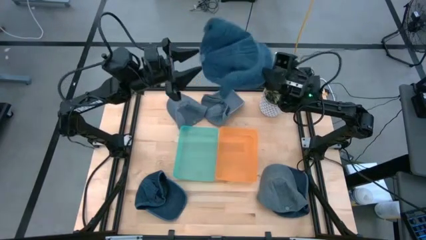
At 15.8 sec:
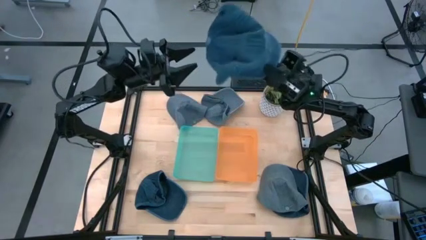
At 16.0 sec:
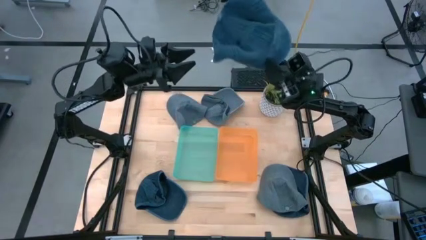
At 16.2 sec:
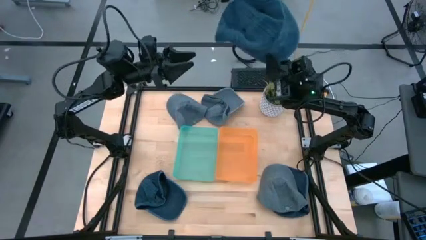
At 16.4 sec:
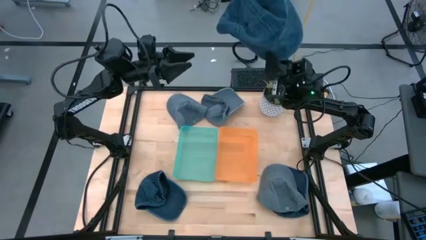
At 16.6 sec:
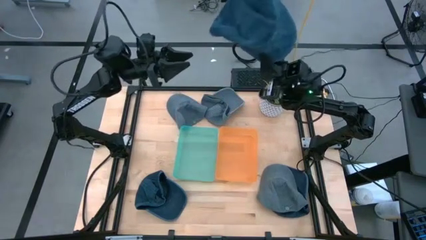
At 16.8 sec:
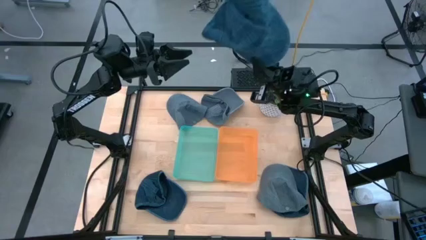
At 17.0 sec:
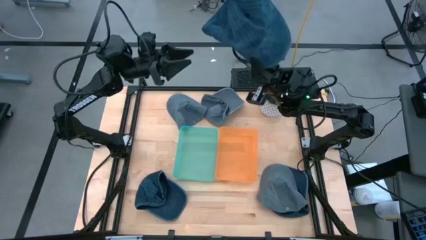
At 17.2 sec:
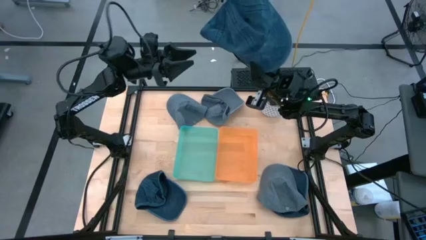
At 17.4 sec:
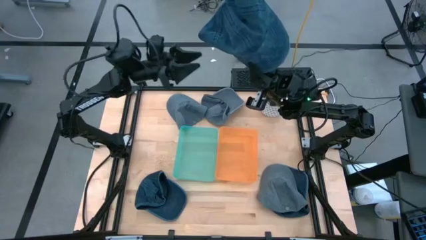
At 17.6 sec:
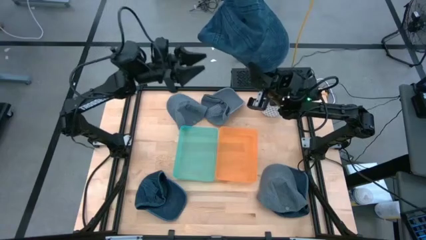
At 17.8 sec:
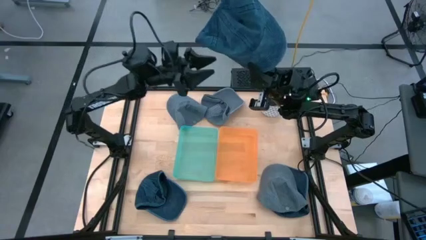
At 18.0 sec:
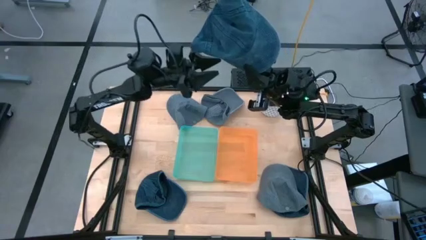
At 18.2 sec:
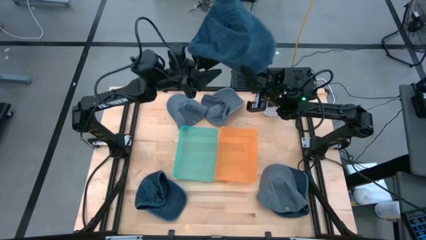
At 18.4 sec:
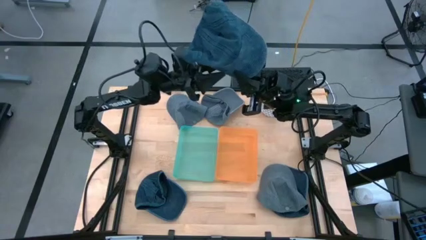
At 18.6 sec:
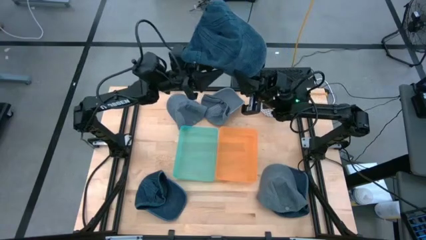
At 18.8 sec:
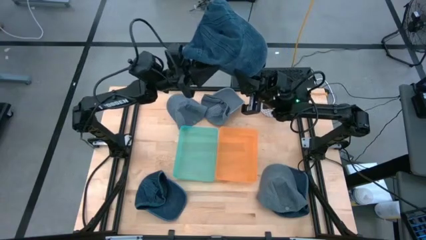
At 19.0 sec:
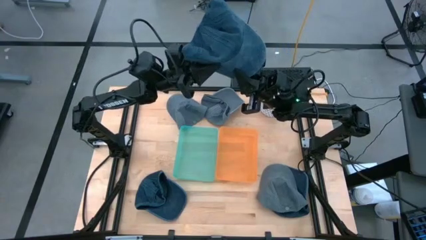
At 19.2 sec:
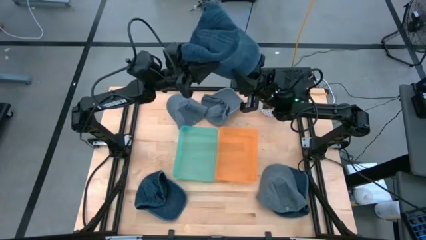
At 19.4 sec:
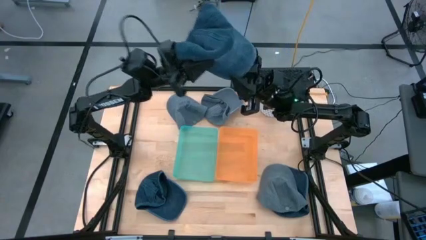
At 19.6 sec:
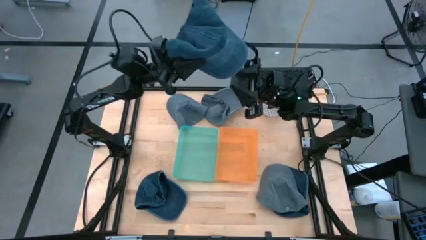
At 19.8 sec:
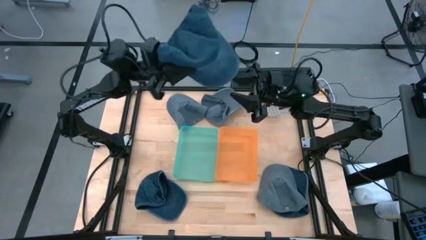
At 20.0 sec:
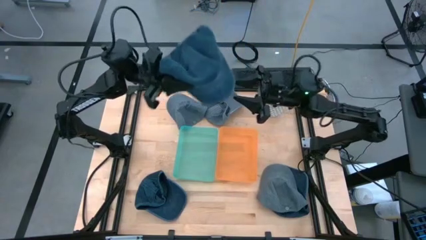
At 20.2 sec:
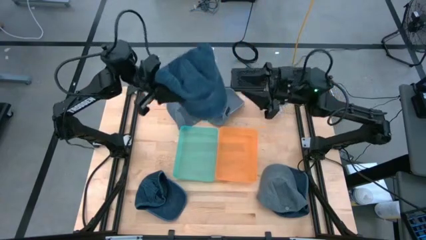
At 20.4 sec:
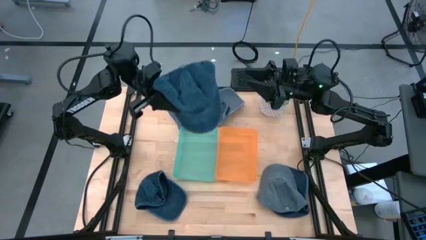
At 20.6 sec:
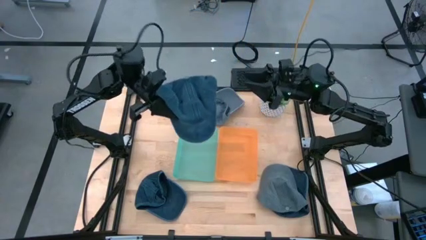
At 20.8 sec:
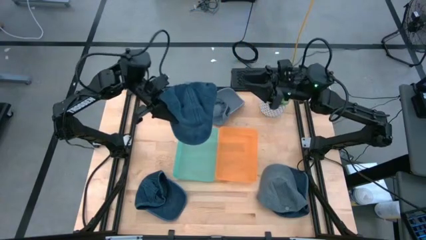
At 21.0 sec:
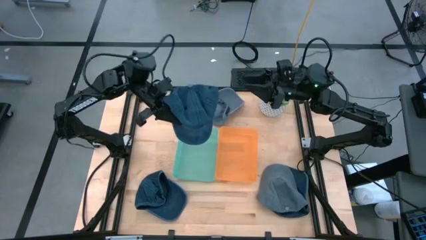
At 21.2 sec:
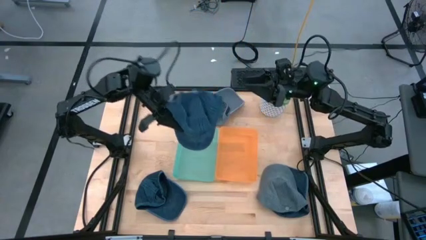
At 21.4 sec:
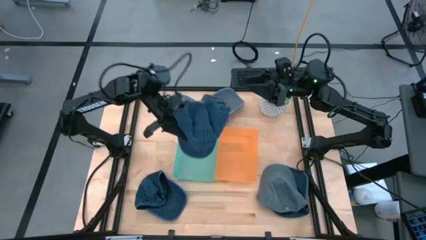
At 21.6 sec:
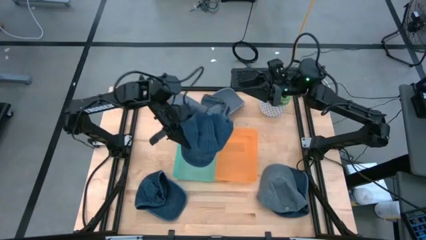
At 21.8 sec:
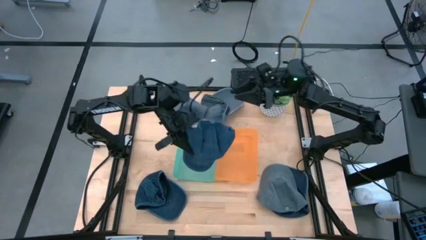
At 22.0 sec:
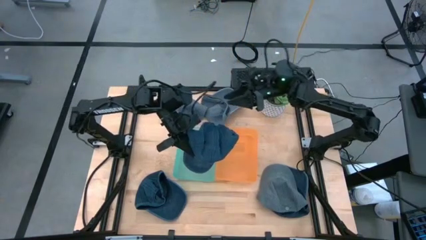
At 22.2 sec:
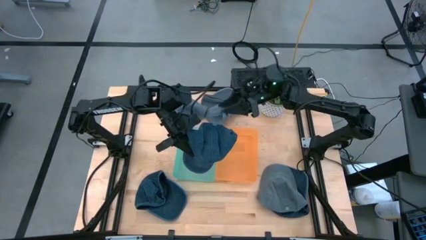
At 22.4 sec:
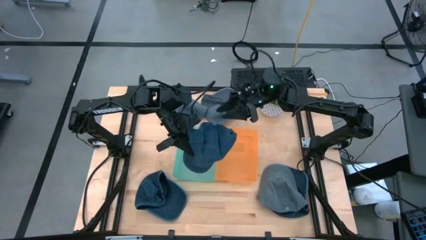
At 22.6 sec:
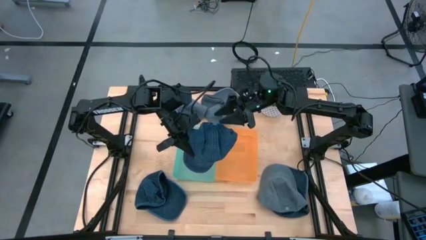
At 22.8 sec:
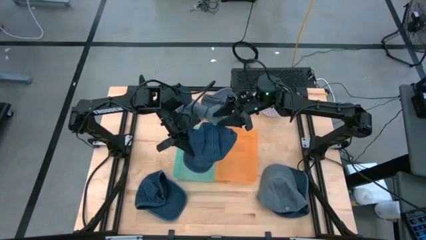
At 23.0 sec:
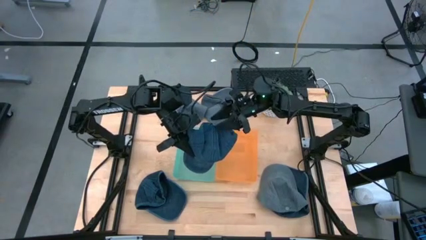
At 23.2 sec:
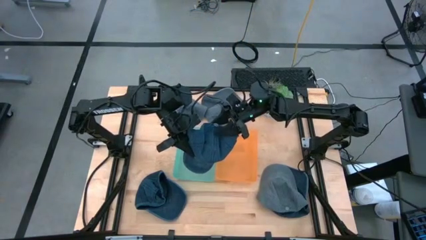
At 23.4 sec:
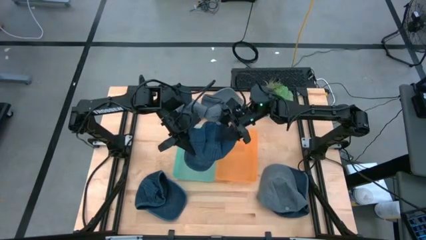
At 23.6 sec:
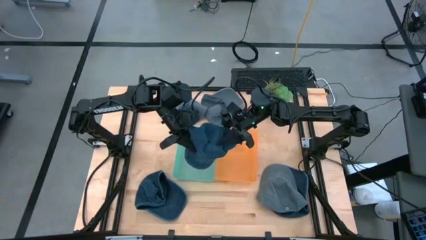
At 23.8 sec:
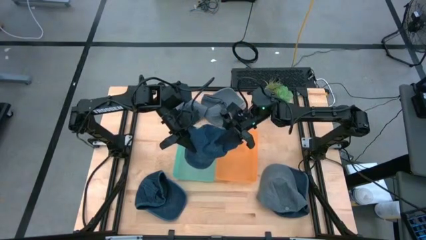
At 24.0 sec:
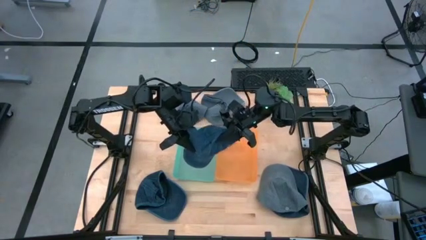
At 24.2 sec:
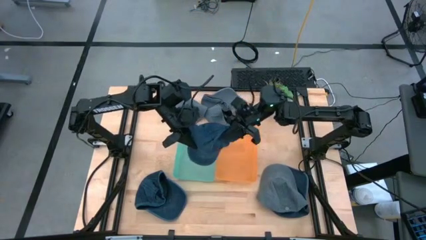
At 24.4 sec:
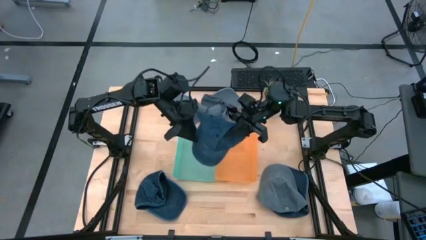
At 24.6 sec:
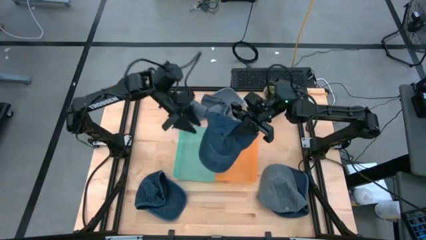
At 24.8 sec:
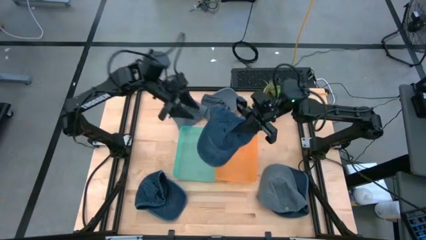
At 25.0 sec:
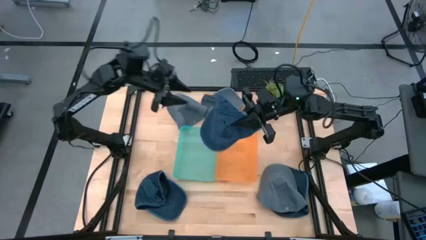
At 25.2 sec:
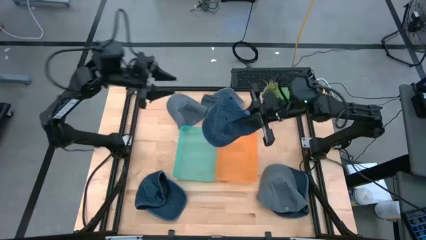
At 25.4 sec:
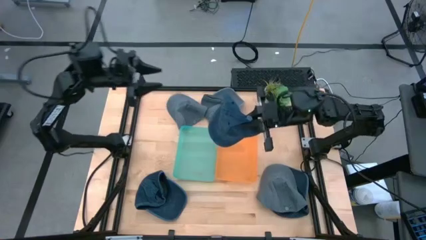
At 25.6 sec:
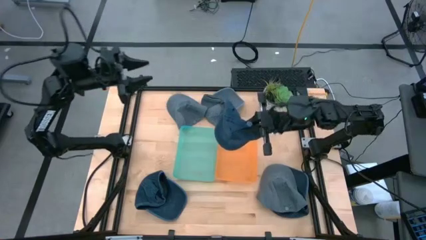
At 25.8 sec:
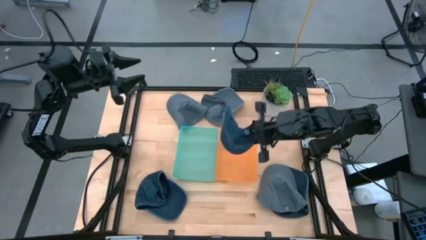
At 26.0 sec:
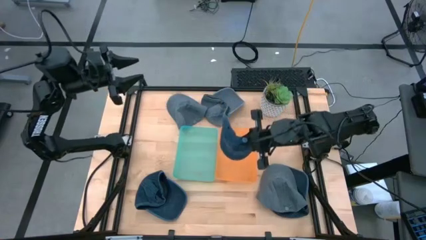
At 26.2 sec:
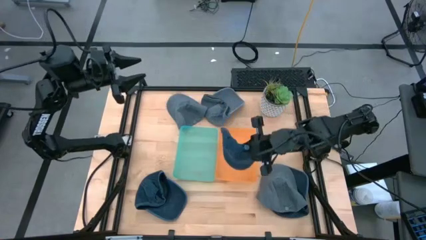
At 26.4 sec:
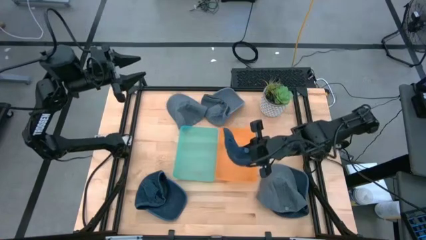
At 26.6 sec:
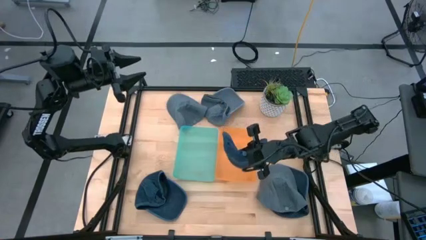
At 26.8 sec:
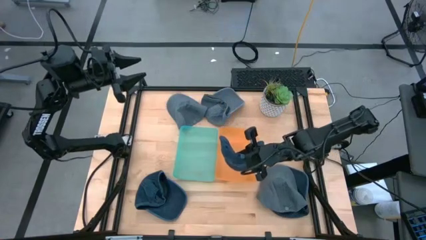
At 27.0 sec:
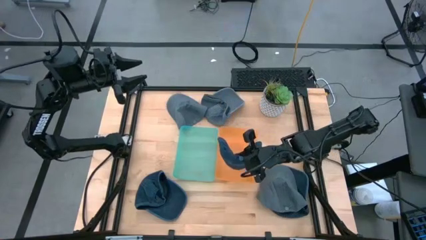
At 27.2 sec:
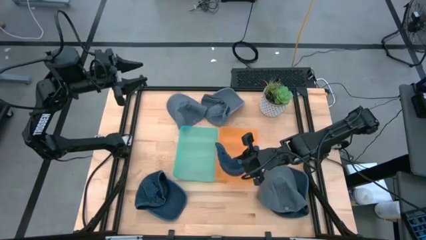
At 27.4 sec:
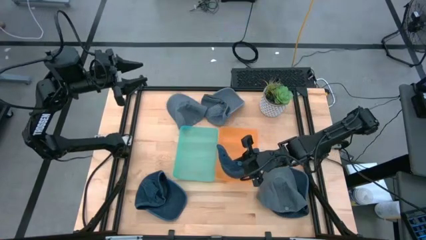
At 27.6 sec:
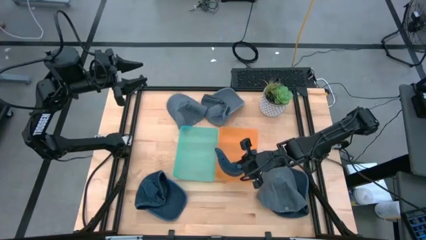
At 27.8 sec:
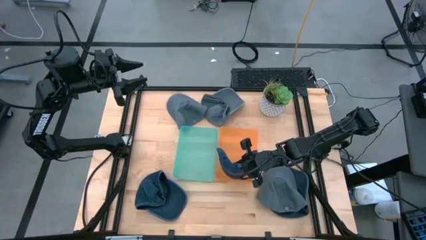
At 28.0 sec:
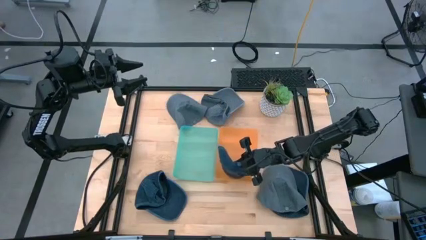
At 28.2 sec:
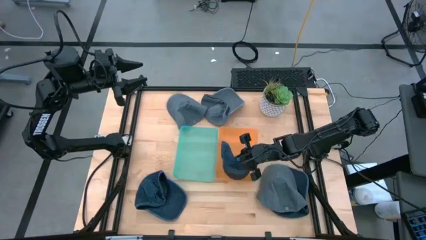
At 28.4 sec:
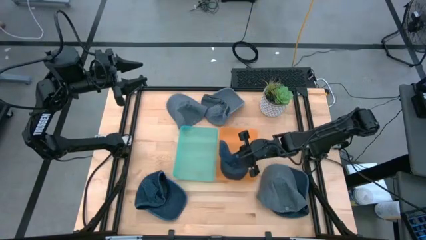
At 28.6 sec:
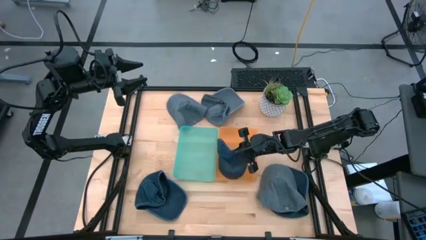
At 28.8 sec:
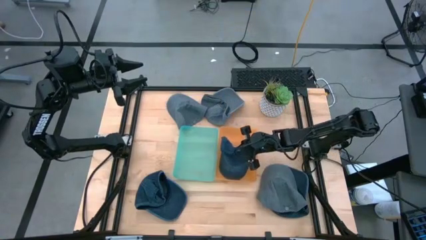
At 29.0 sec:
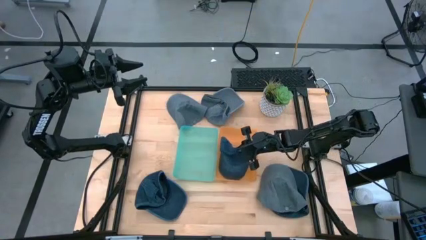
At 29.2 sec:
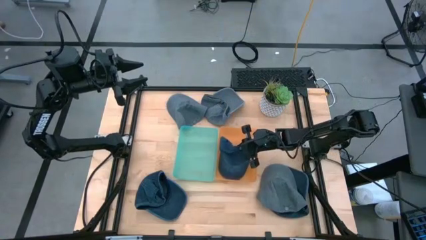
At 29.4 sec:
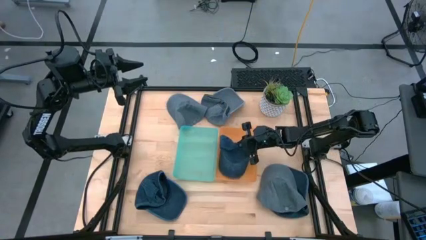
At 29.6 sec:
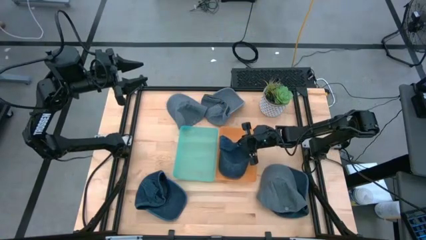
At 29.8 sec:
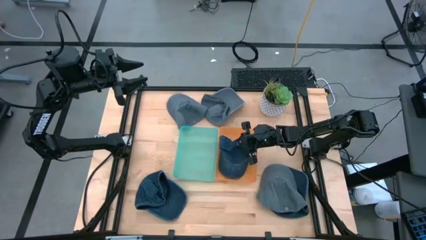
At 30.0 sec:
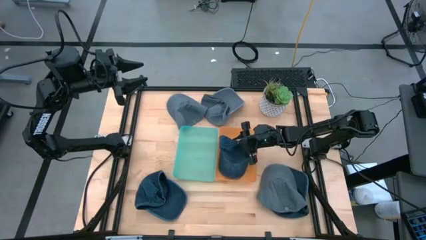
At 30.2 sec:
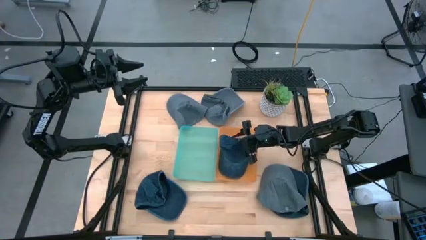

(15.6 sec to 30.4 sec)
Task: Pick & Place hat
Put the top blue cap into the orange bin
